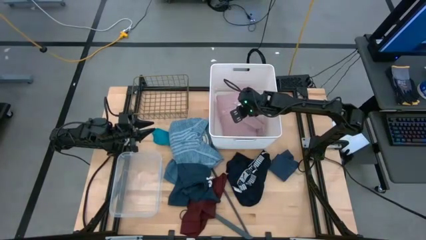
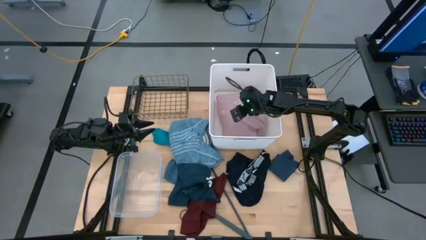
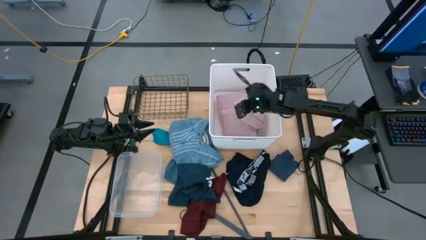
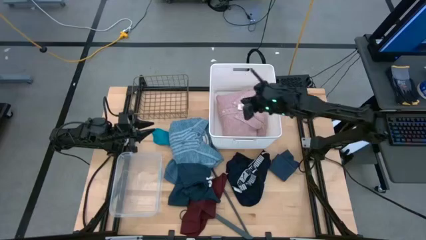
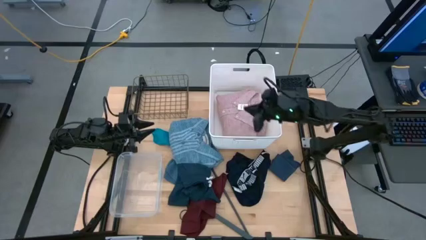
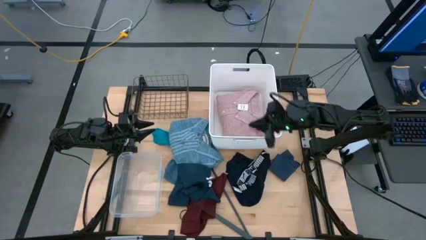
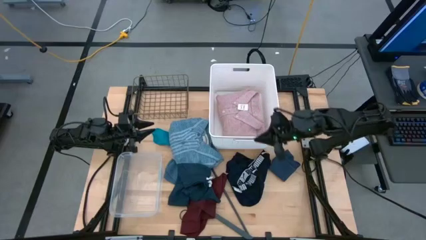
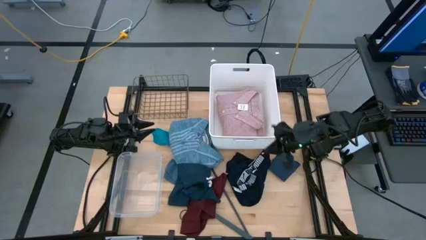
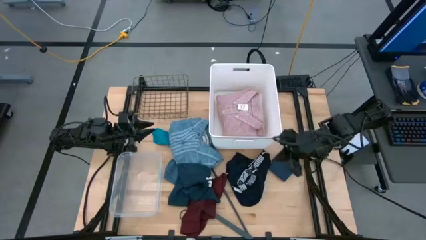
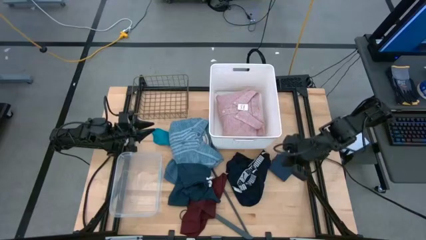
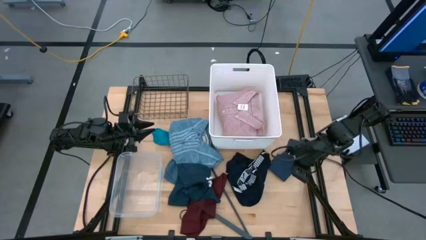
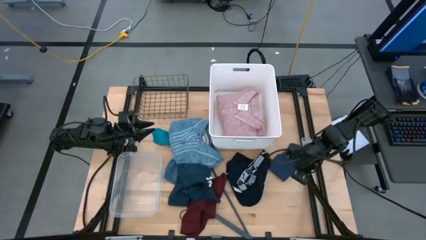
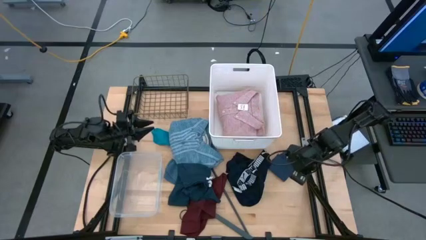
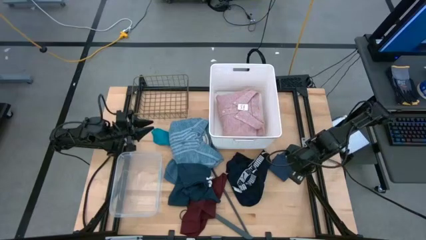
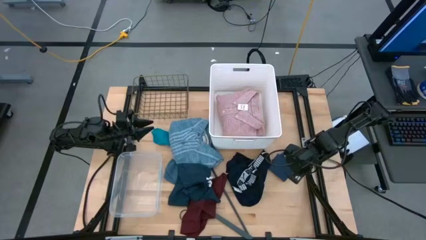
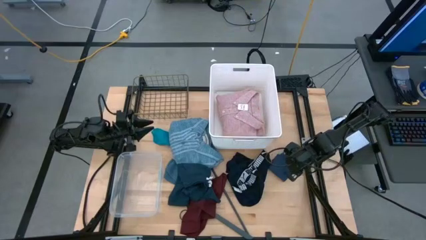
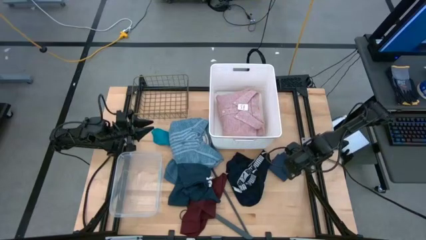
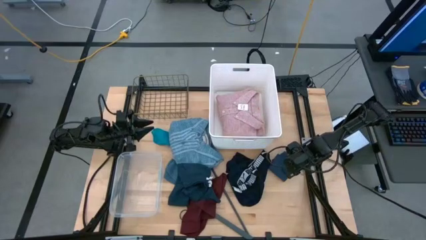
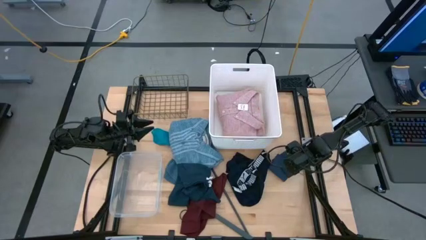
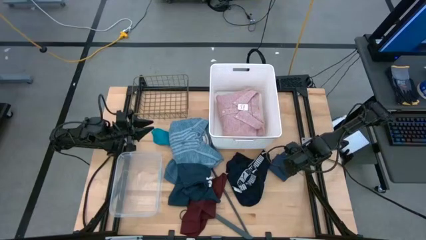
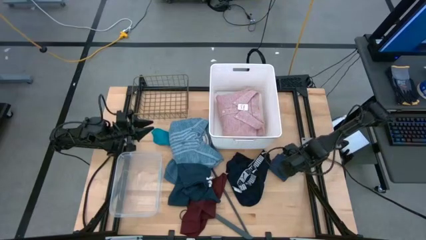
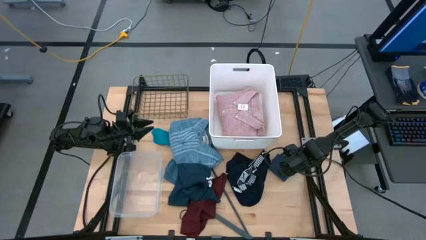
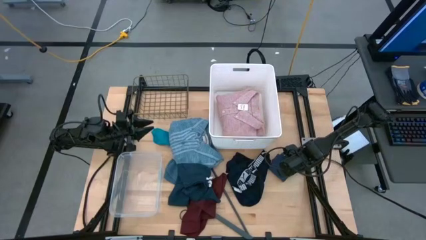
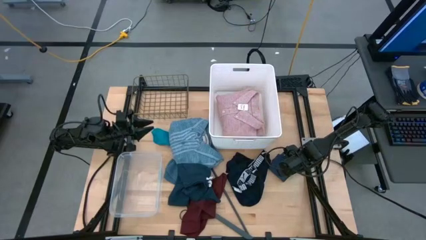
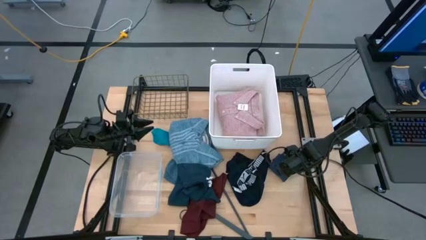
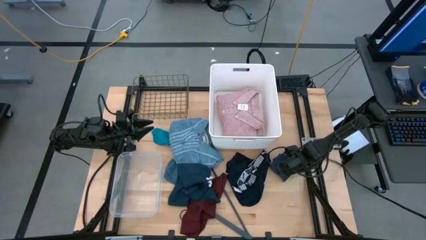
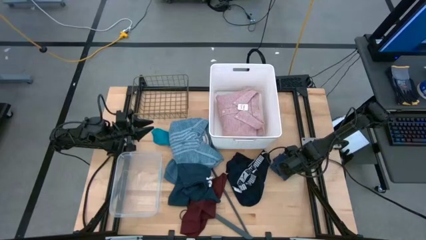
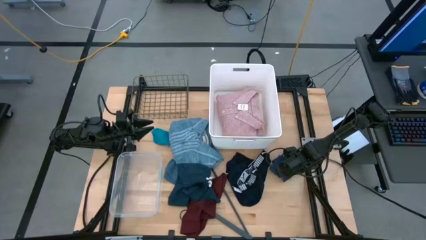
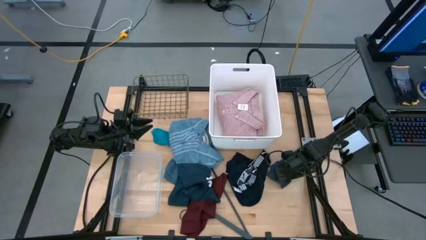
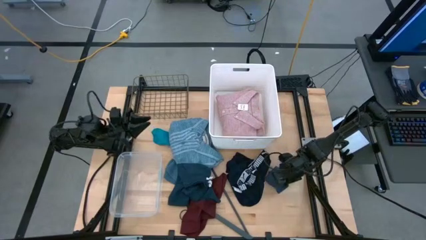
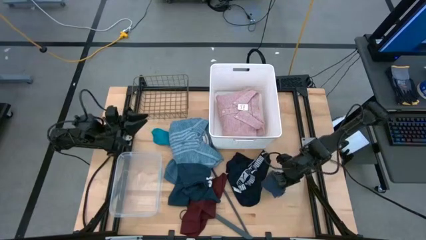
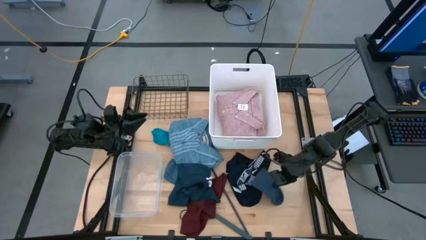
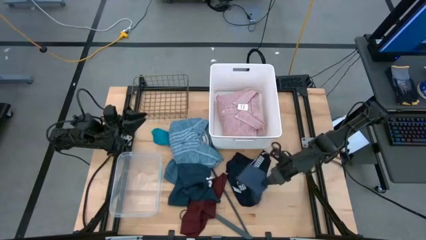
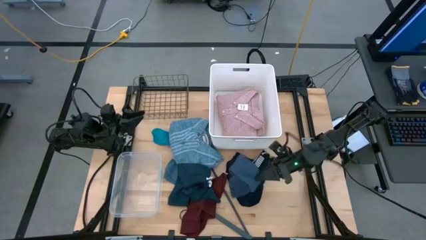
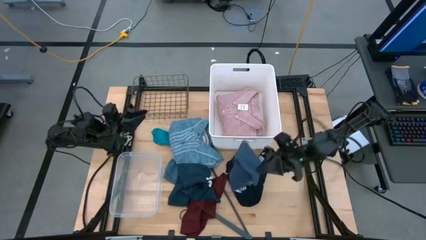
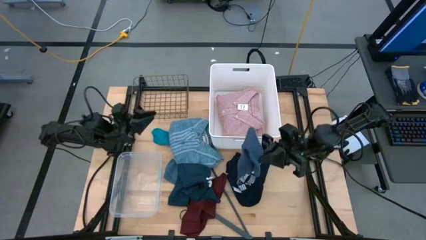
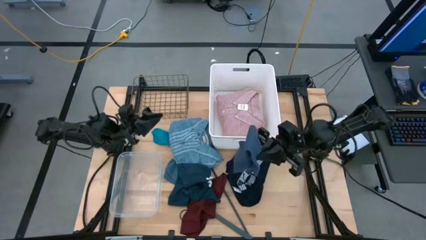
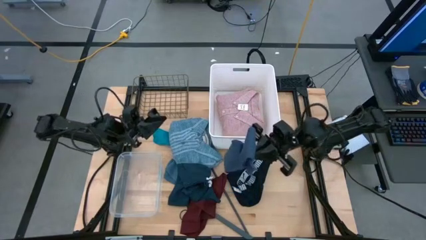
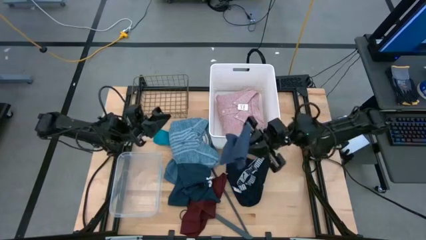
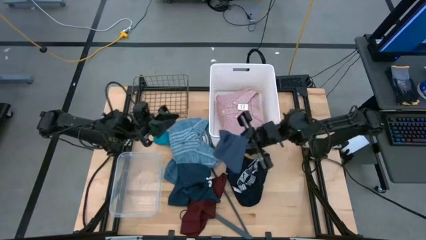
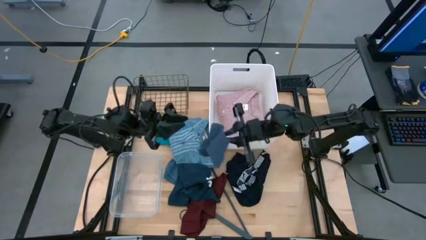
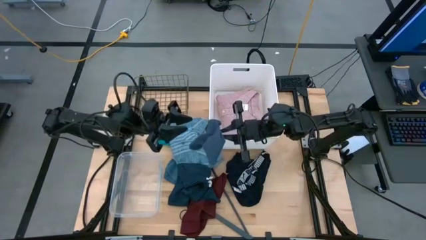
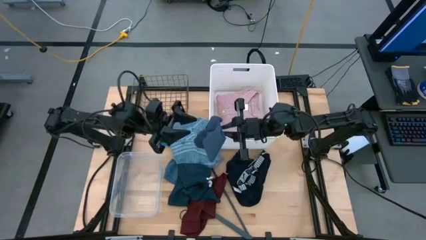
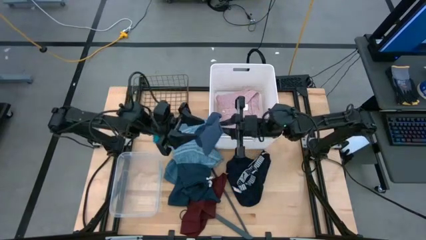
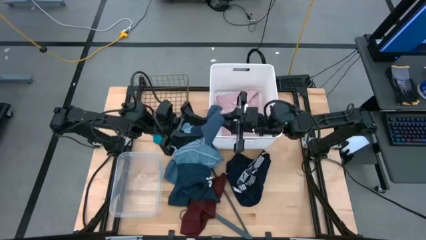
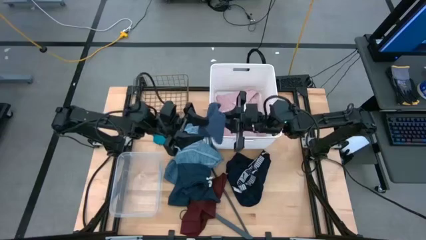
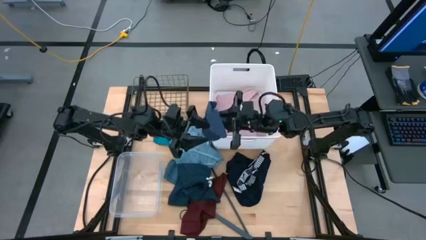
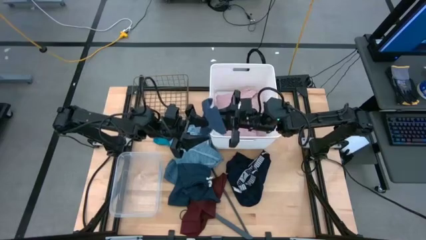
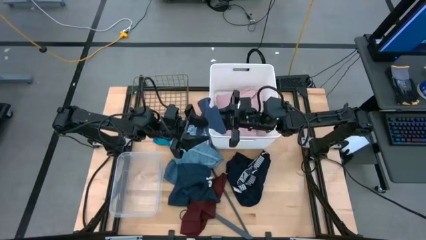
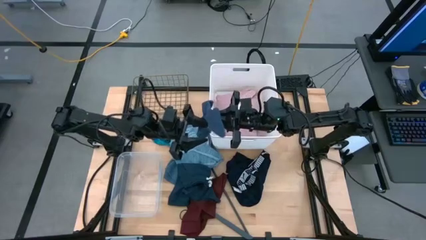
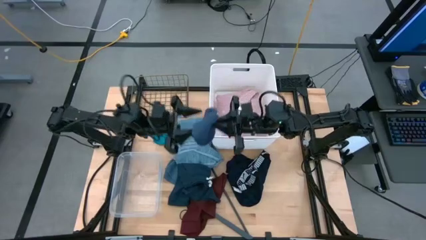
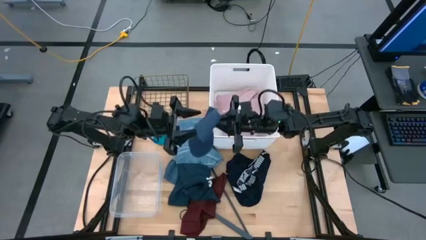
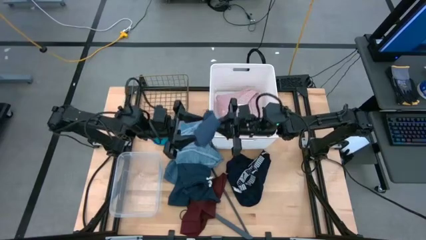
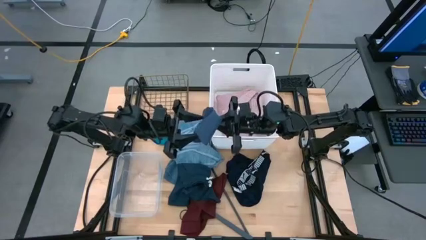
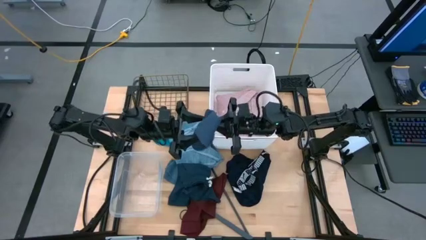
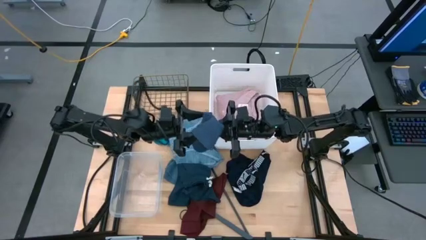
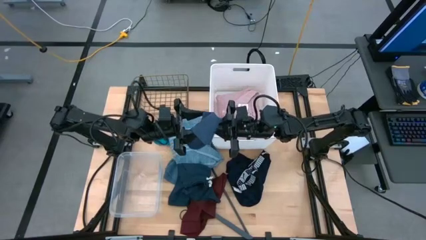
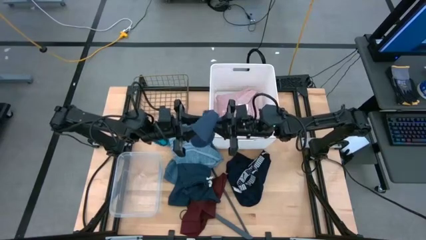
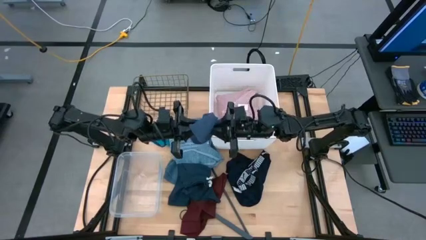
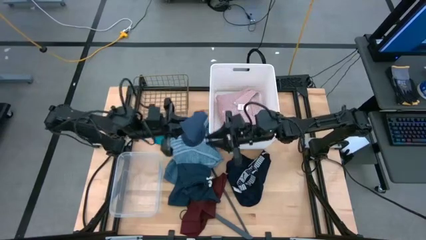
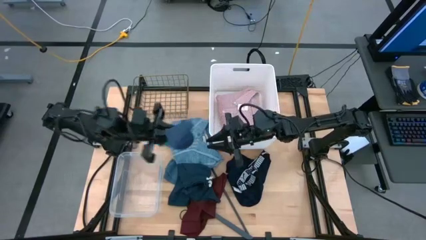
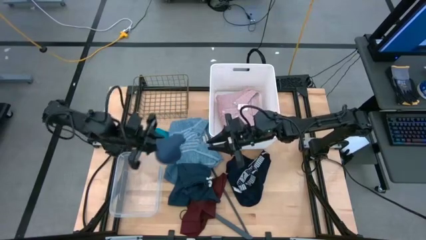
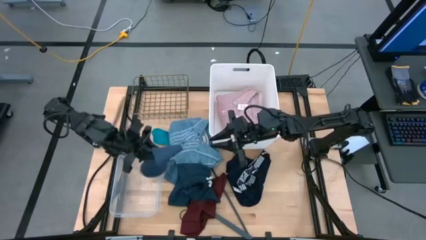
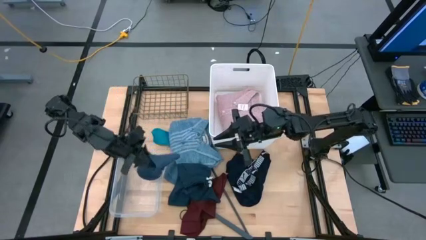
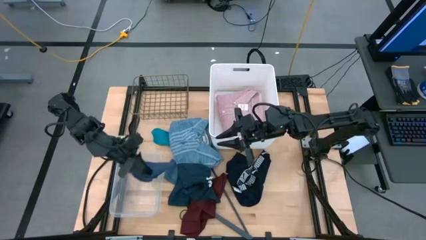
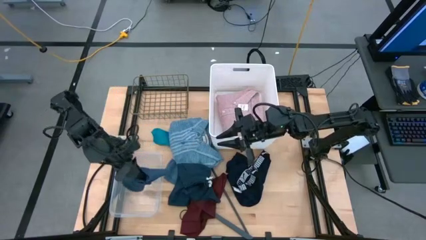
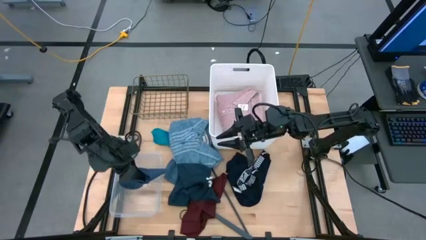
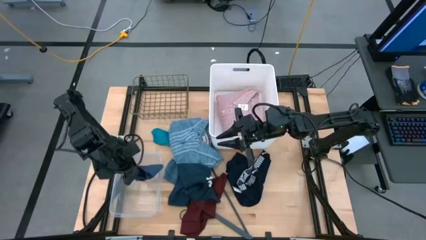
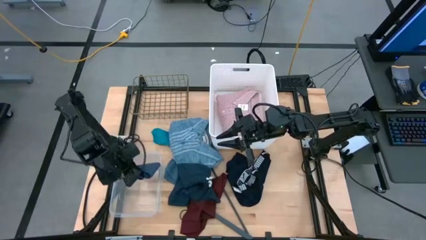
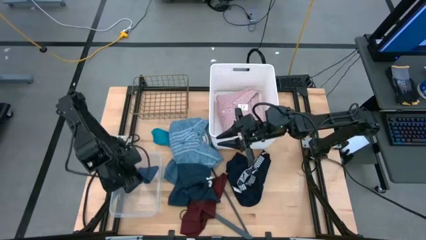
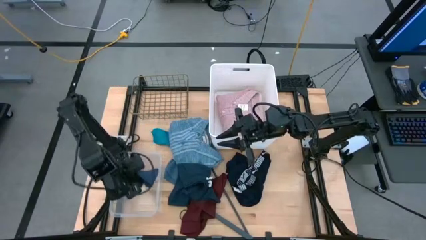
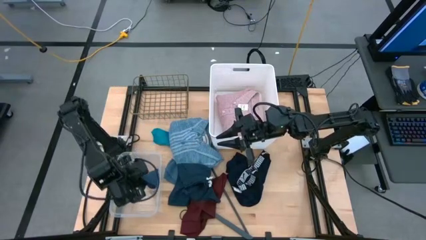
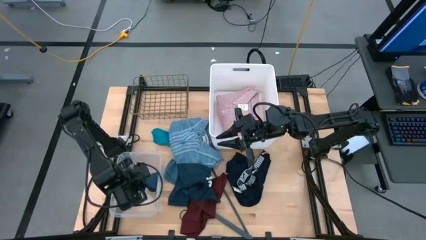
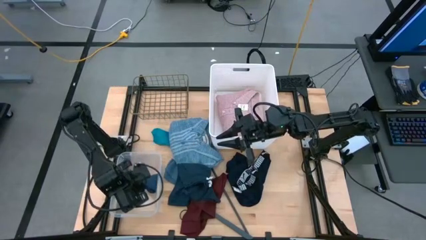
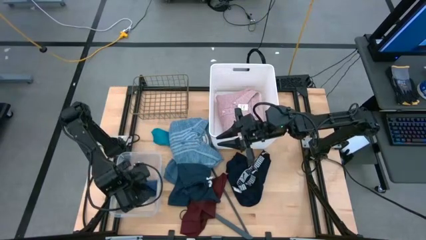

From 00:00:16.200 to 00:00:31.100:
Task: Pick & Place Cloths
Put the dark gray sock into the transparent bin

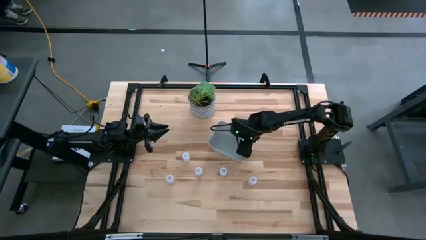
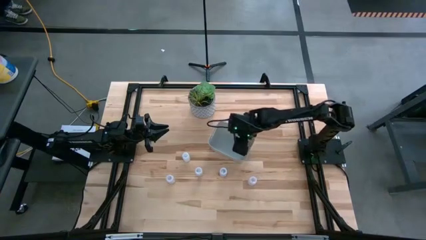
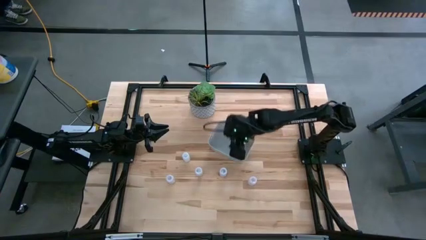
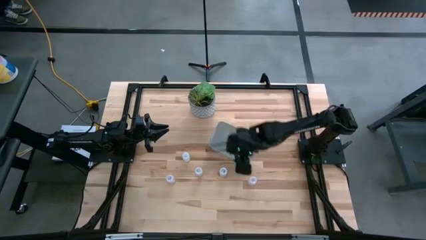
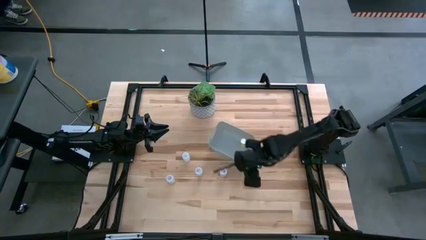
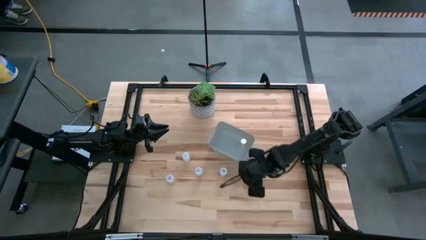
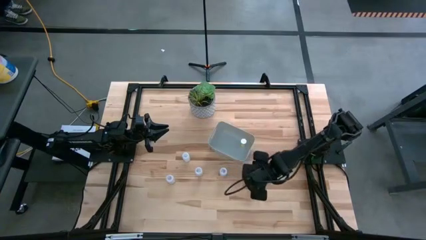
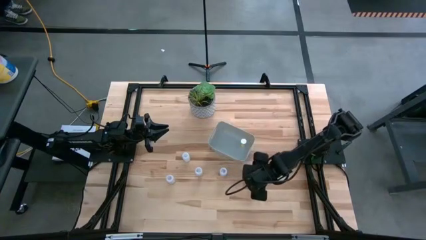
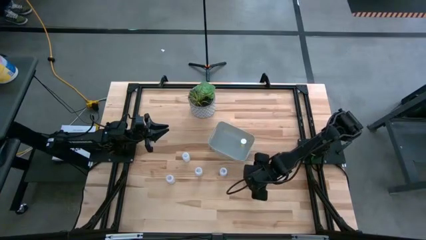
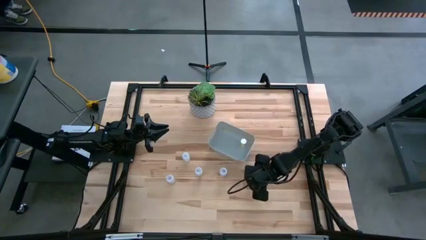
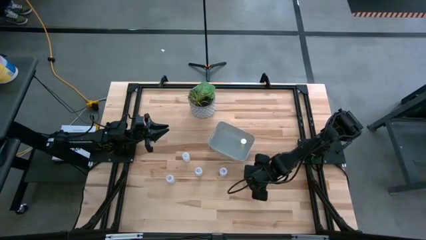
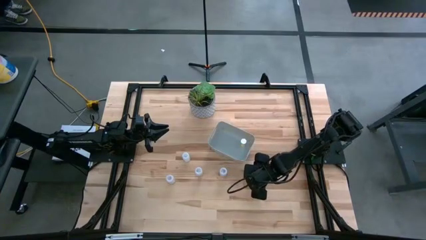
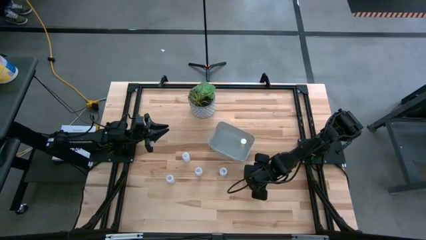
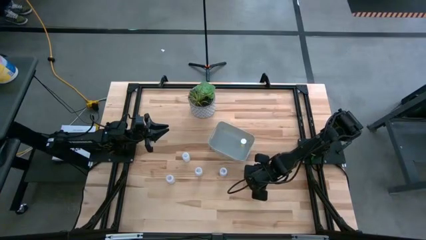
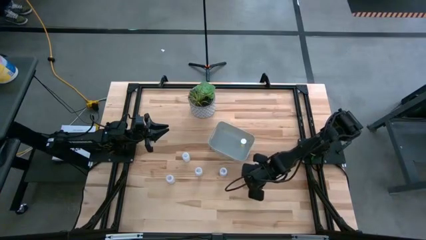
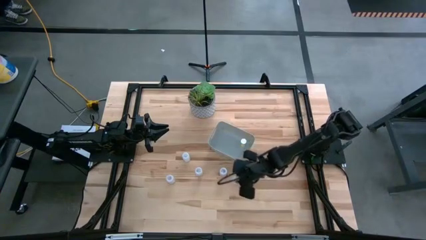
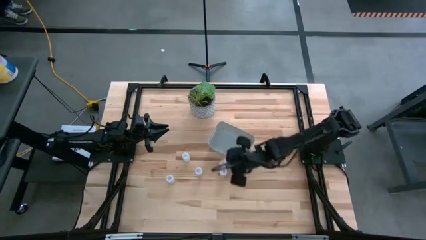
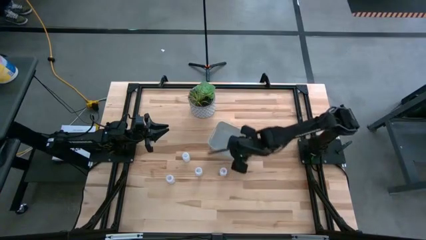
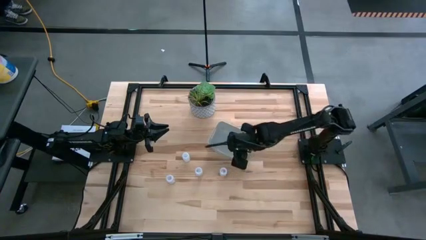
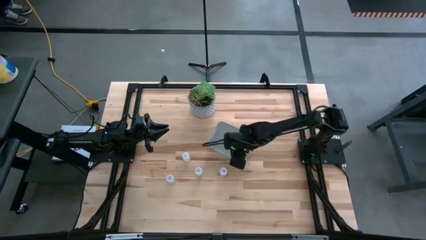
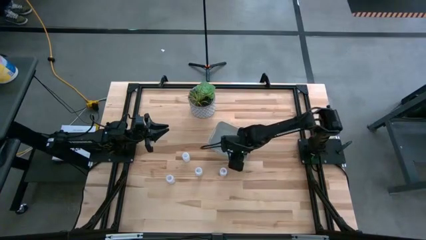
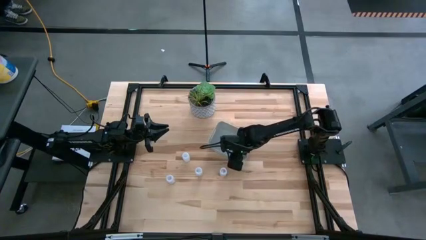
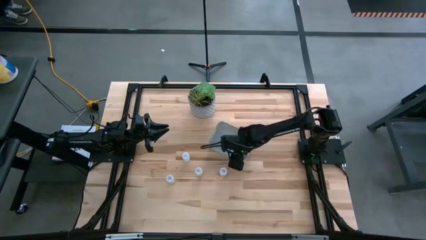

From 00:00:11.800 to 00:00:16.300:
Task: Pick and place pill bottles into a basket
Put the right transparent capsule bottle into the white bin
